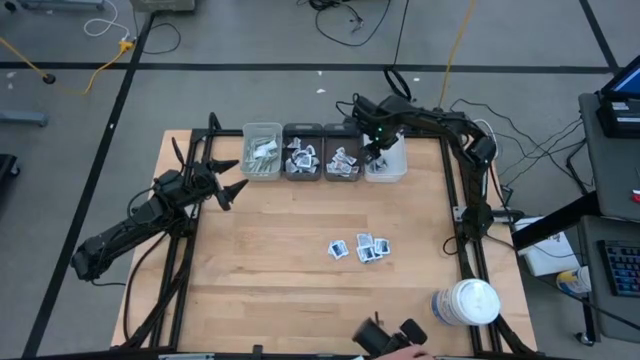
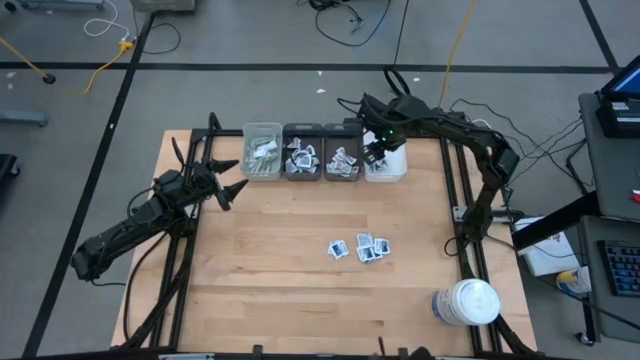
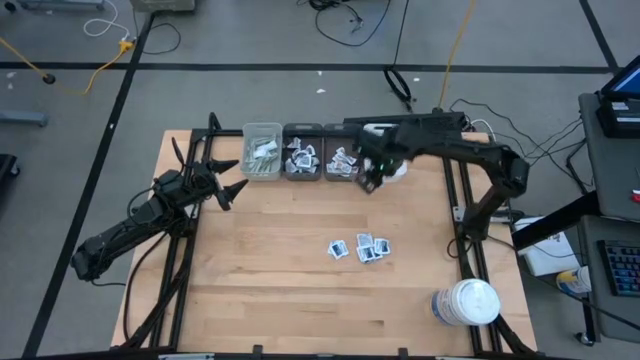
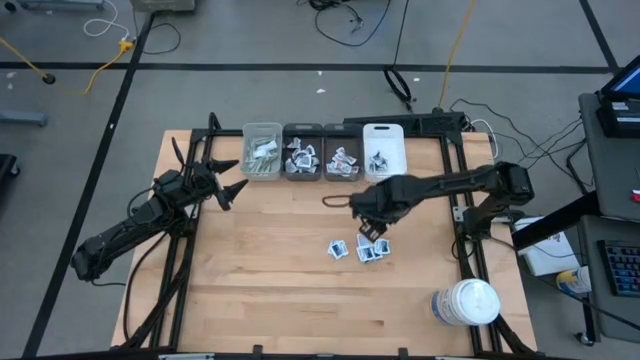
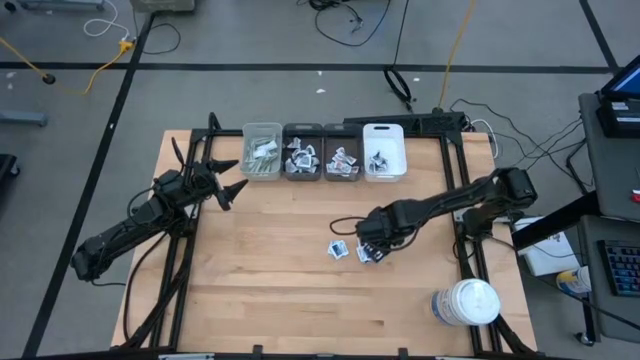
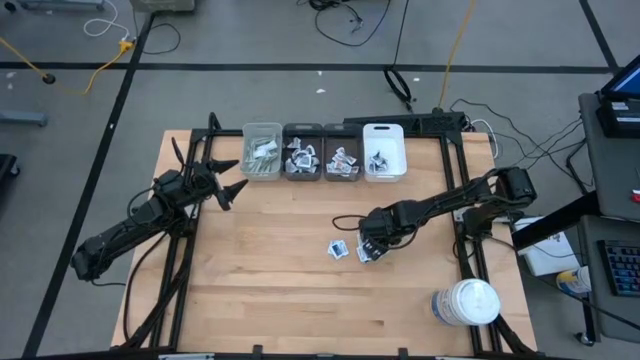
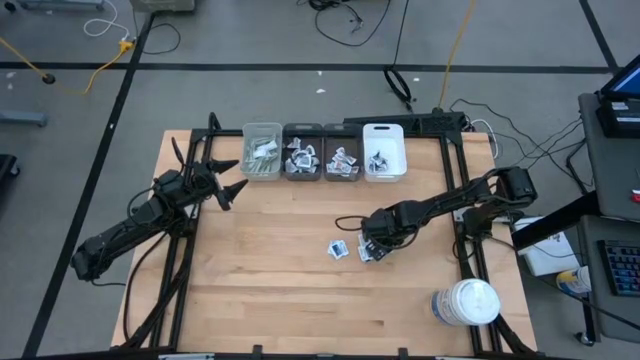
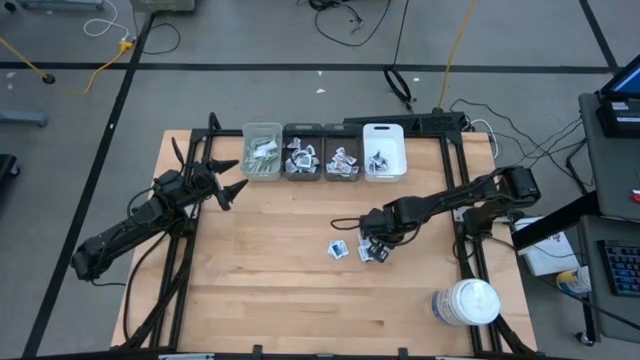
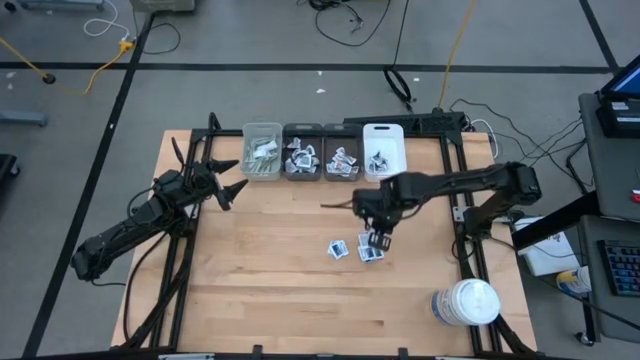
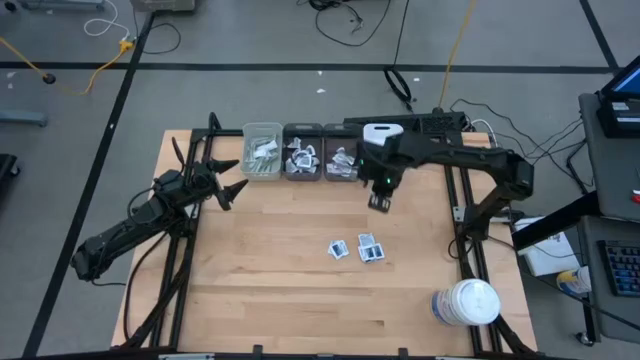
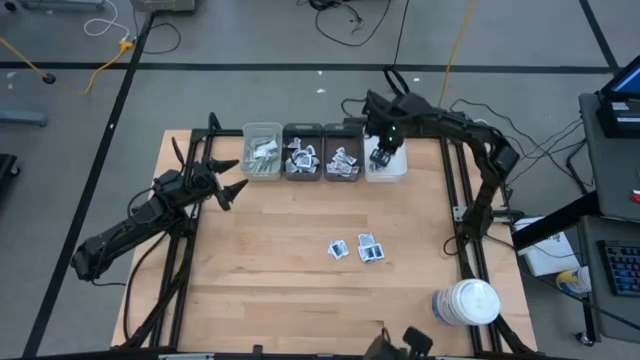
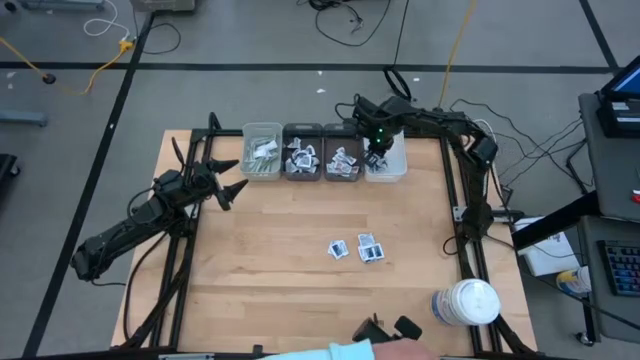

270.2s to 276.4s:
Task: Pick & Place First Aid Supplies
Put the alcohol pad into the white bin

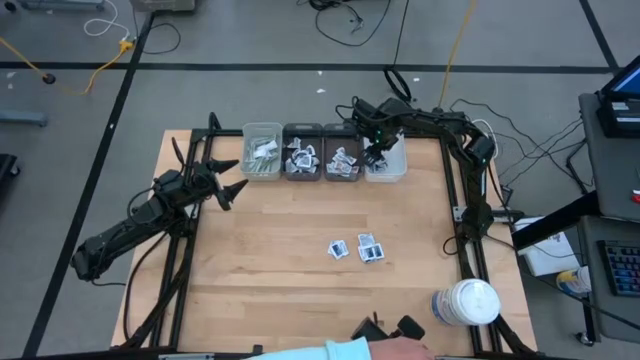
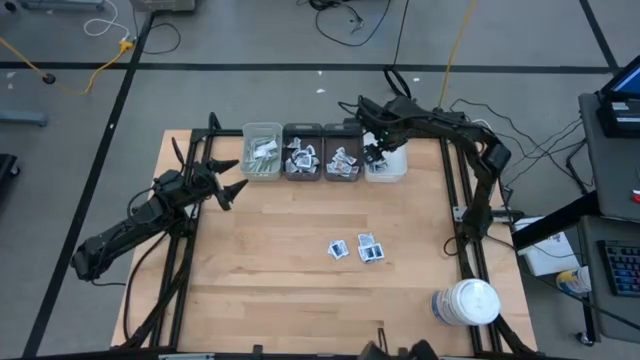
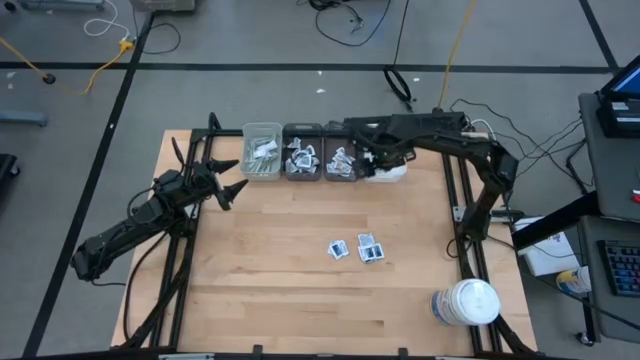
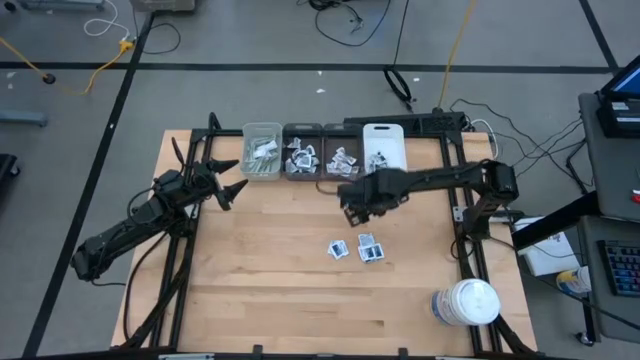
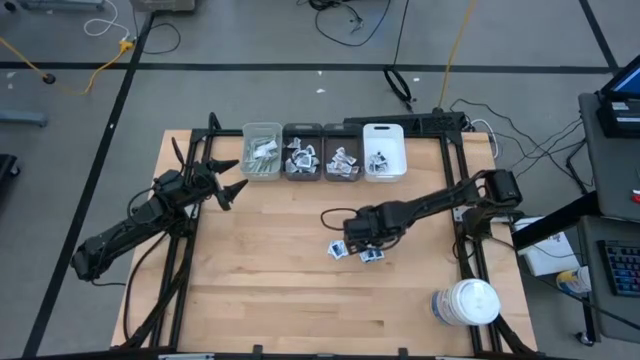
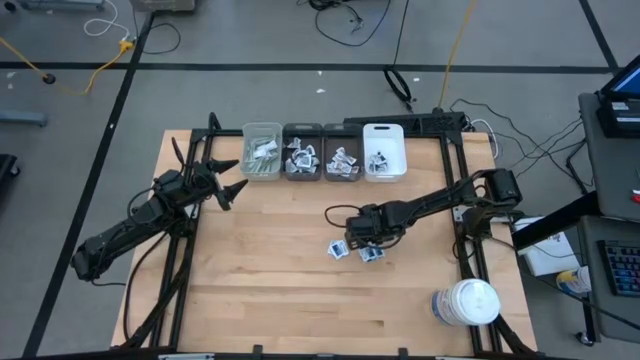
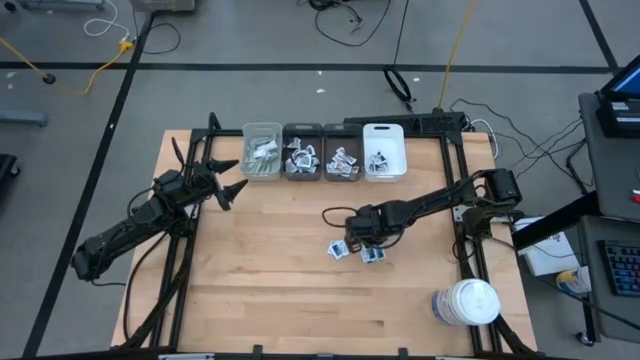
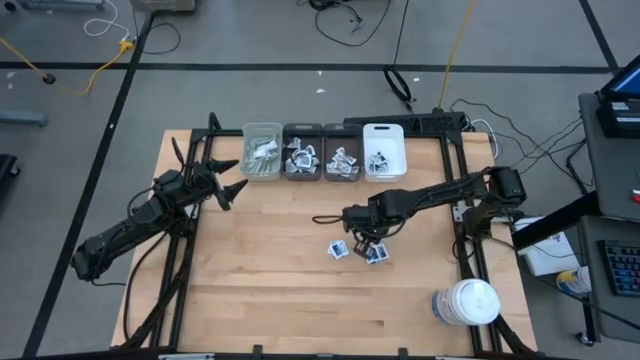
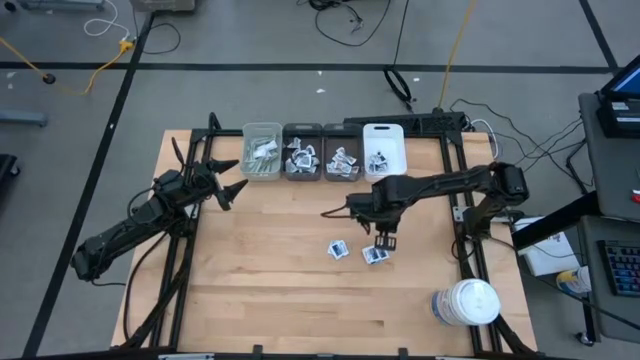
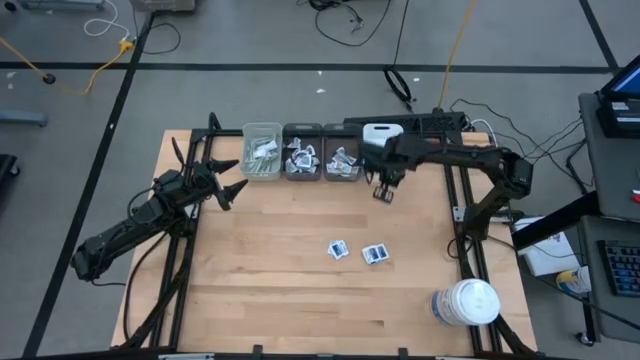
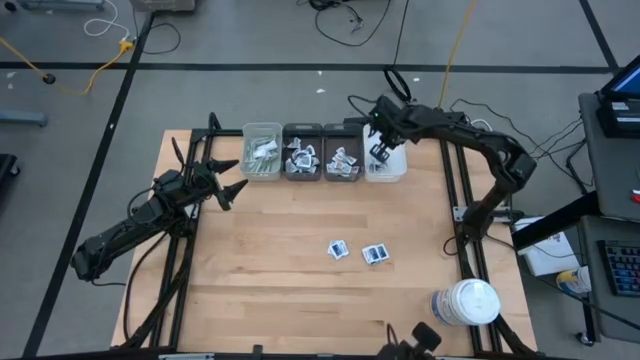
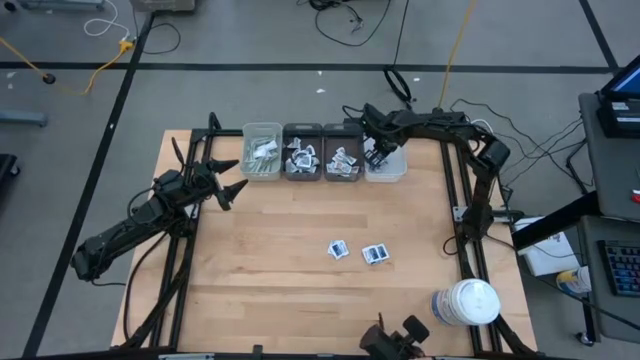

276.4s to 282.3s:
Put the alcohol pad into the white bin

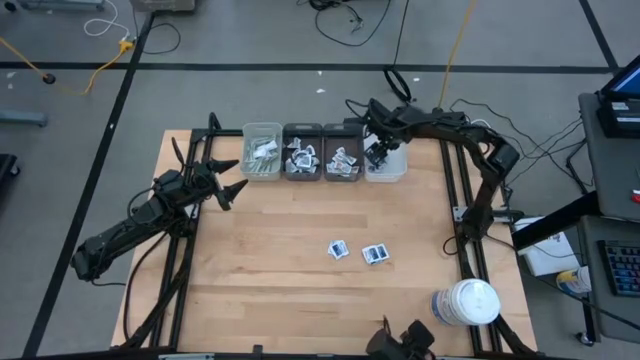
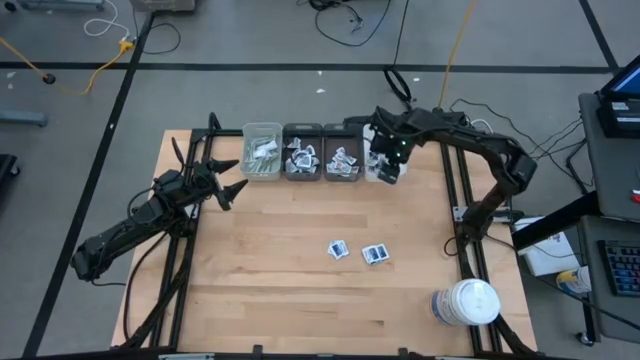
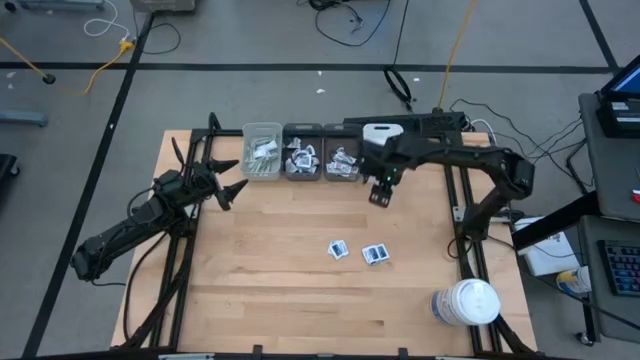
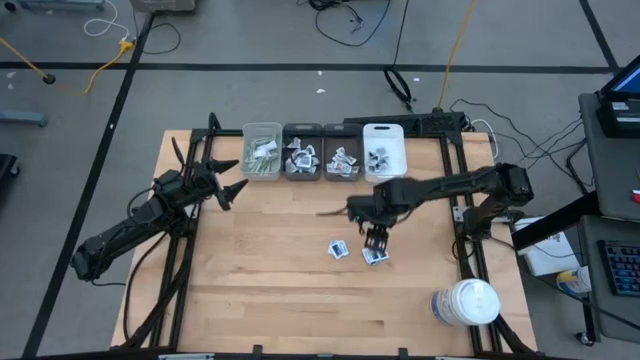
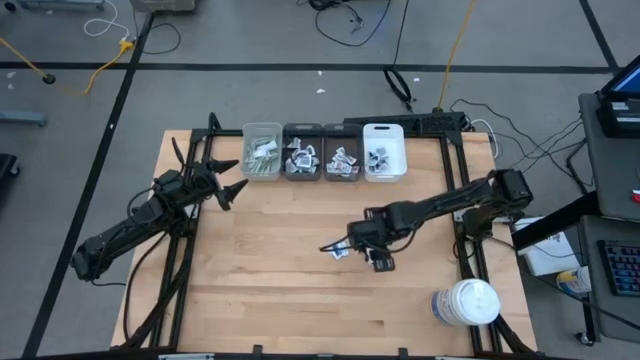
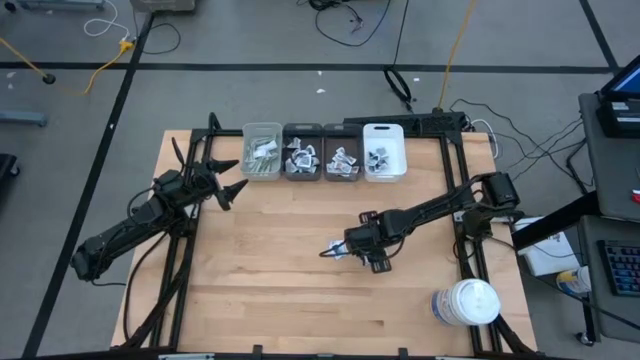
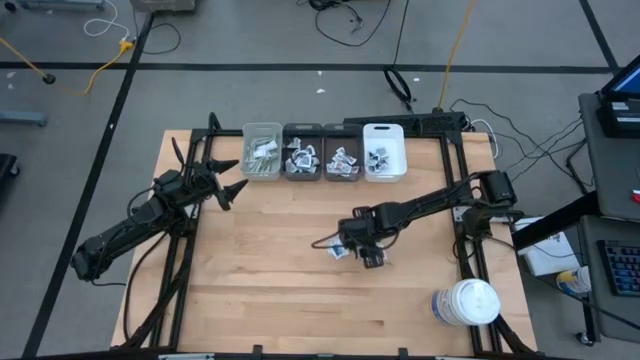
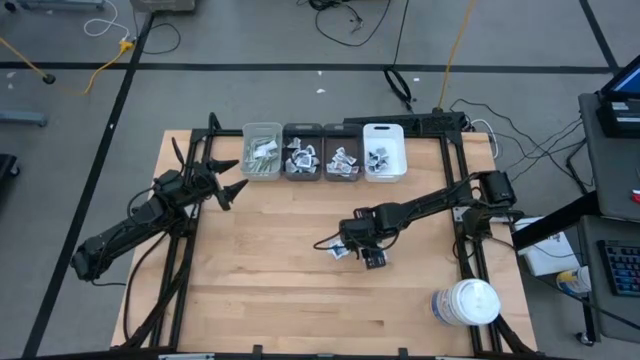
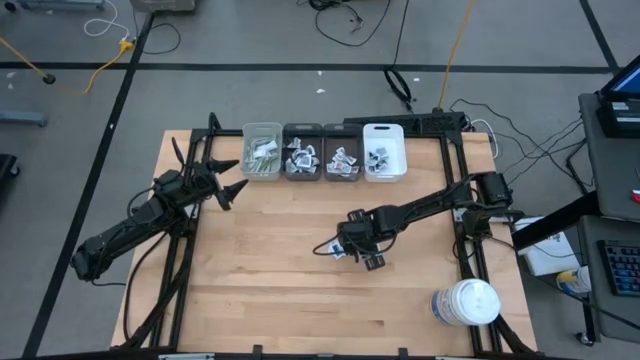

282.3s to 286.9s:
Put the alcohol pad into the white bin

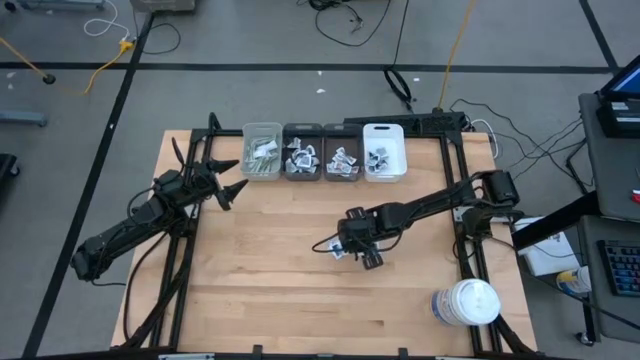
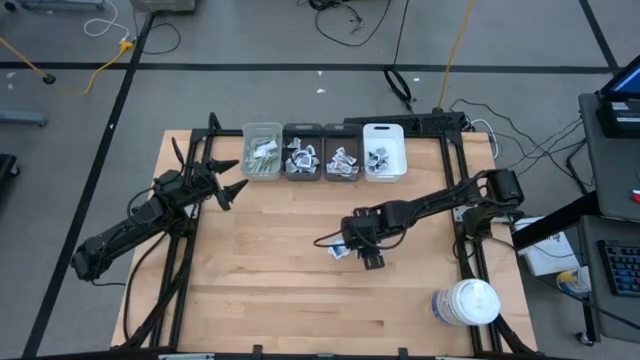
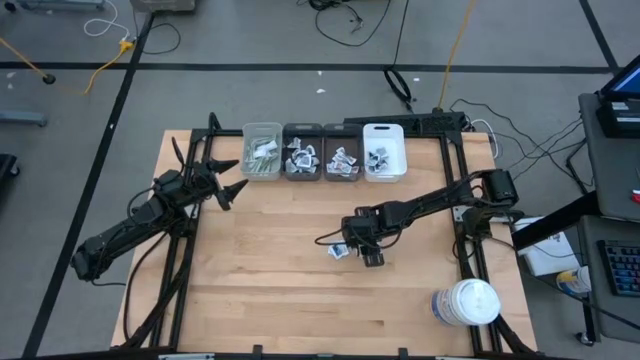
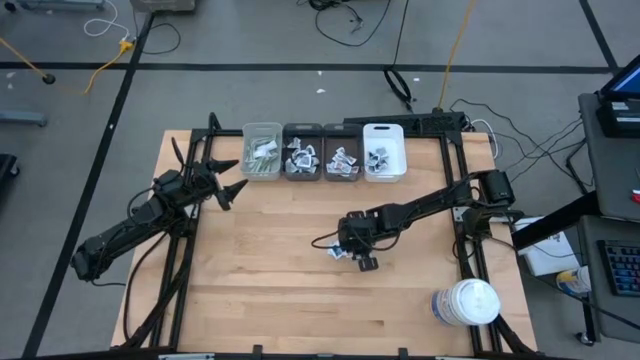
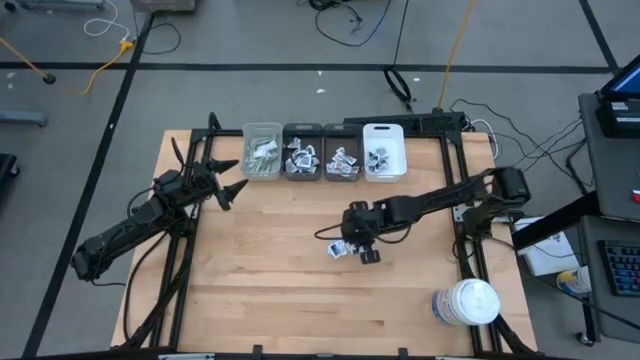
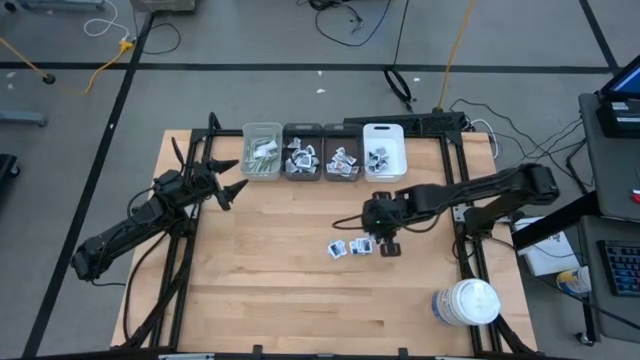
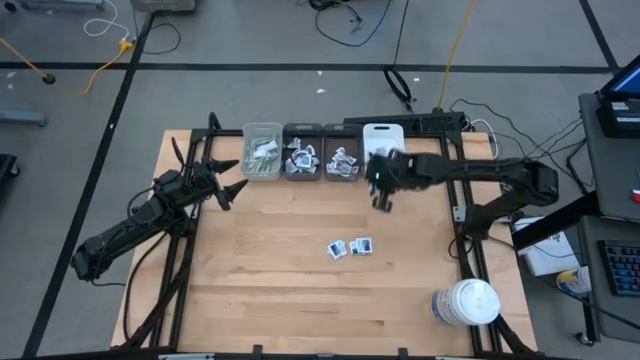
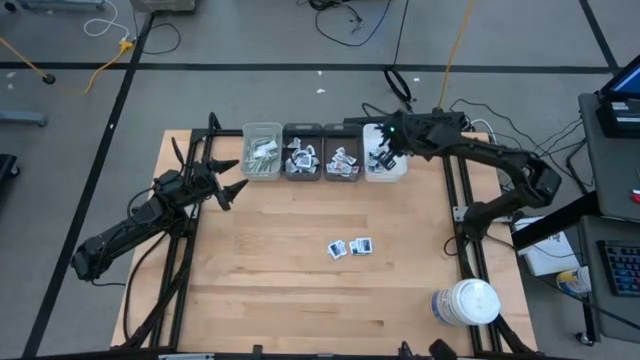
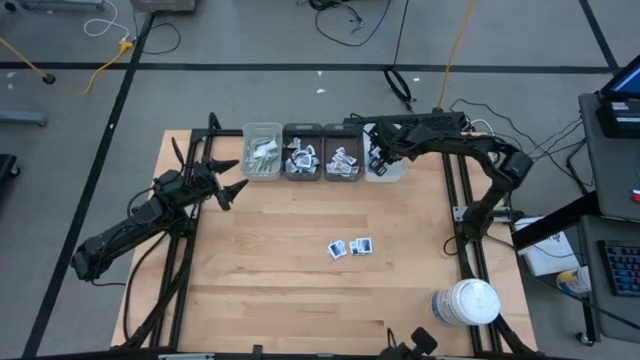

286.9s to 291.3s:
Put the alcohol pad into the white bin
